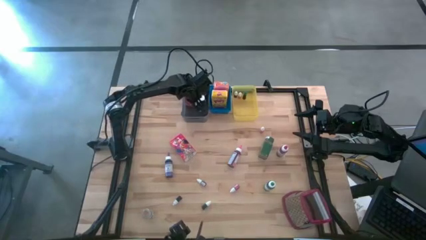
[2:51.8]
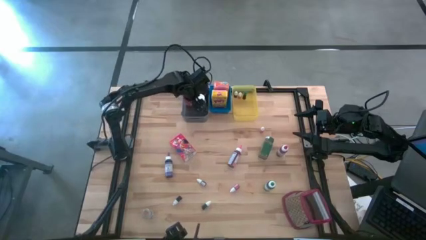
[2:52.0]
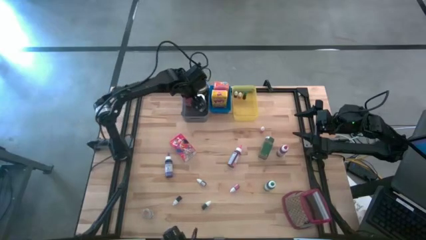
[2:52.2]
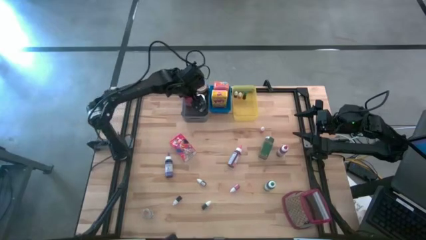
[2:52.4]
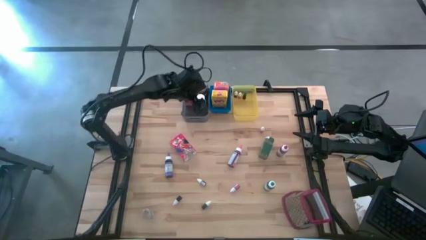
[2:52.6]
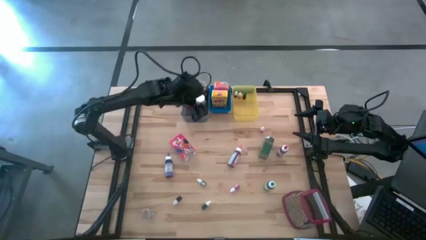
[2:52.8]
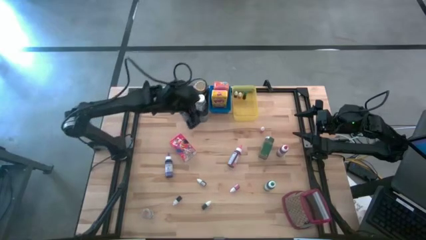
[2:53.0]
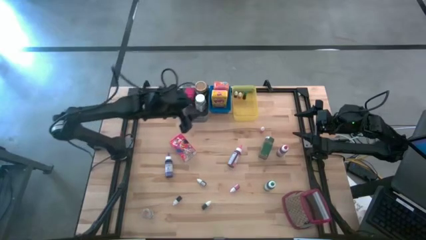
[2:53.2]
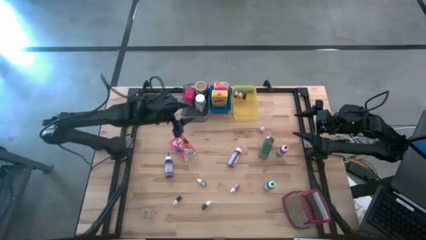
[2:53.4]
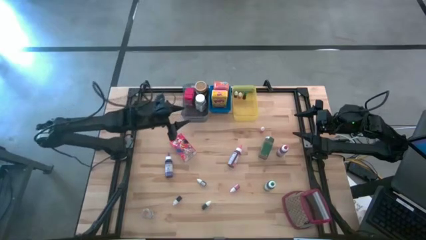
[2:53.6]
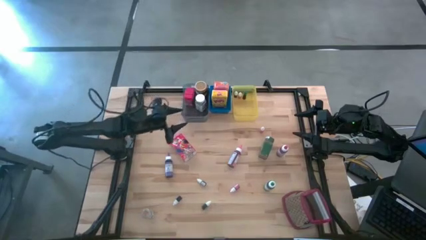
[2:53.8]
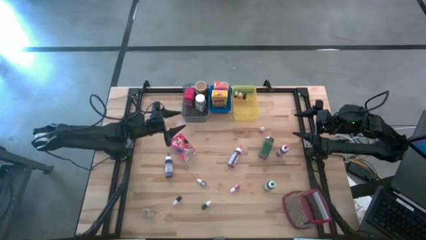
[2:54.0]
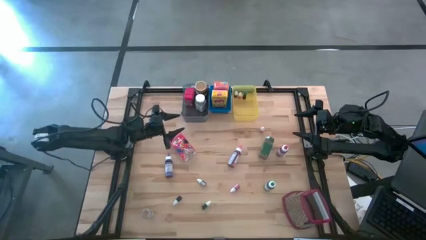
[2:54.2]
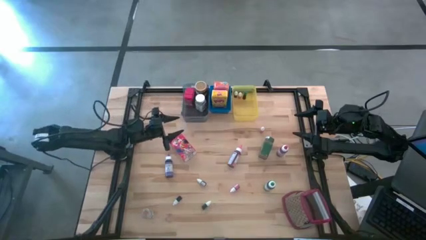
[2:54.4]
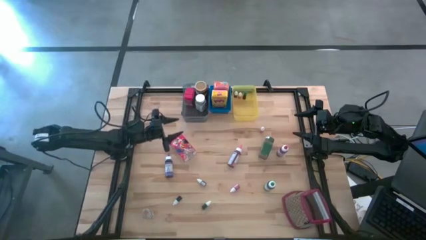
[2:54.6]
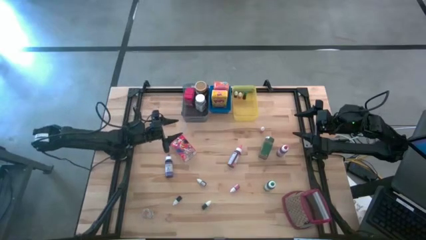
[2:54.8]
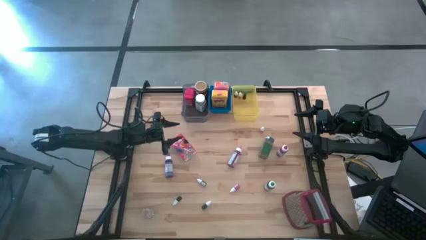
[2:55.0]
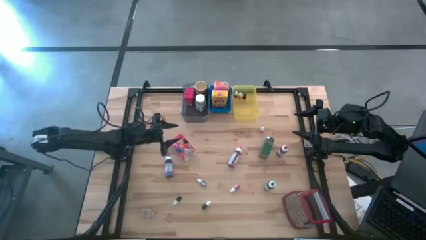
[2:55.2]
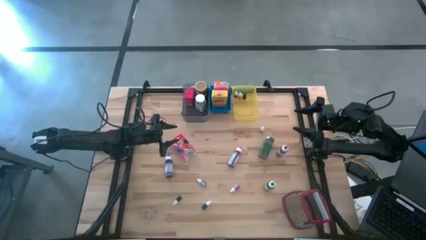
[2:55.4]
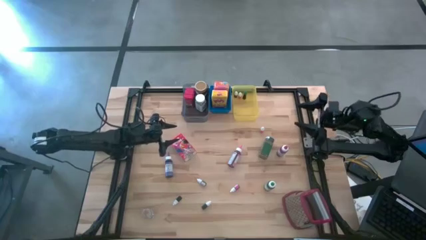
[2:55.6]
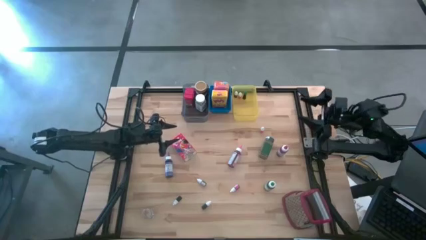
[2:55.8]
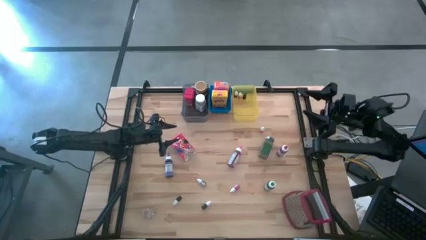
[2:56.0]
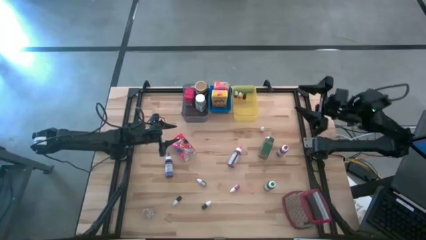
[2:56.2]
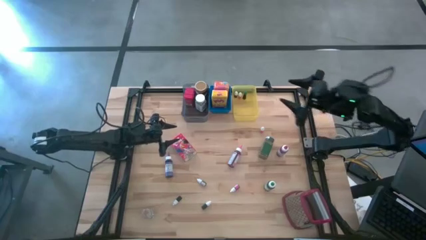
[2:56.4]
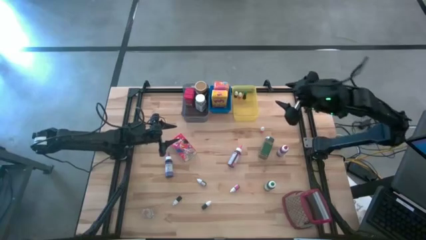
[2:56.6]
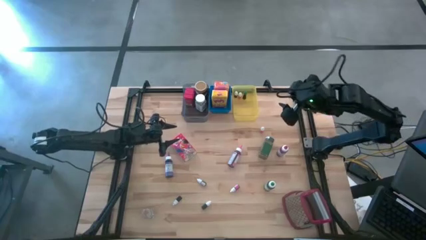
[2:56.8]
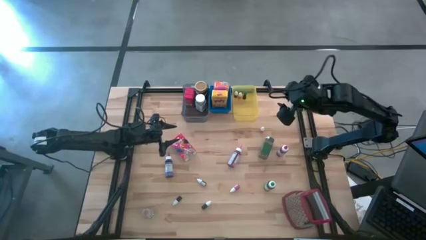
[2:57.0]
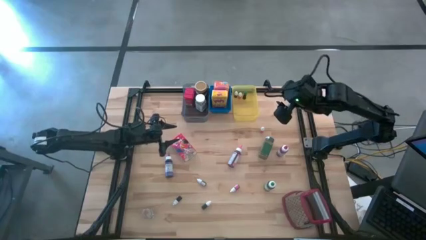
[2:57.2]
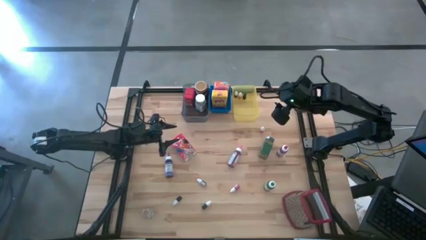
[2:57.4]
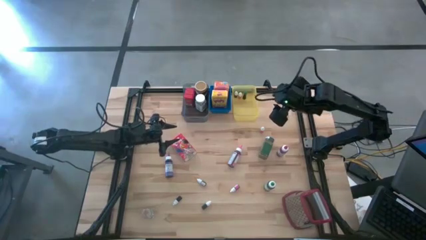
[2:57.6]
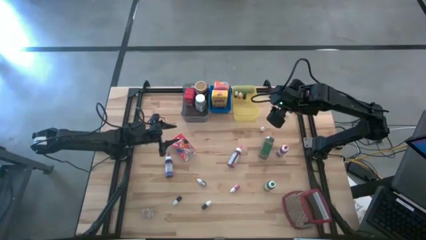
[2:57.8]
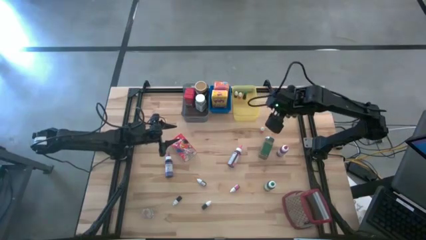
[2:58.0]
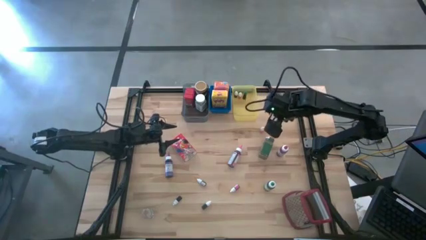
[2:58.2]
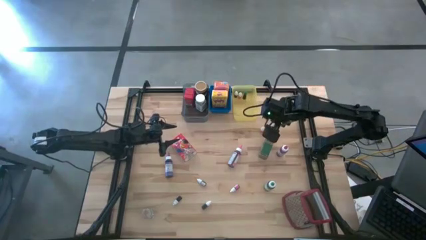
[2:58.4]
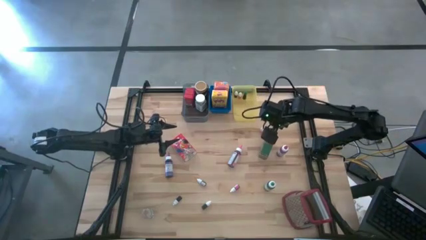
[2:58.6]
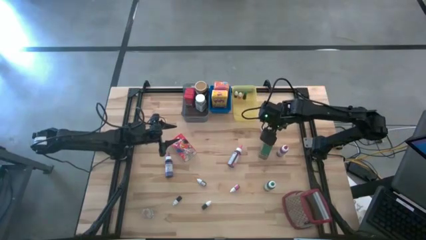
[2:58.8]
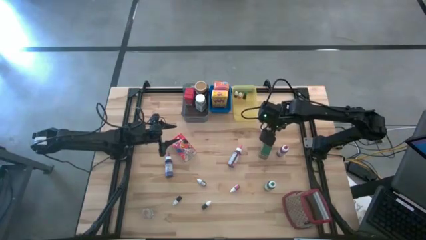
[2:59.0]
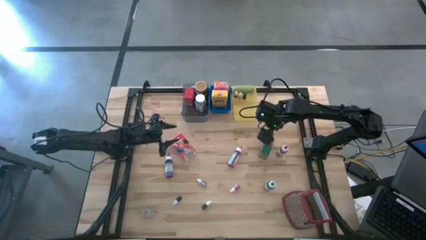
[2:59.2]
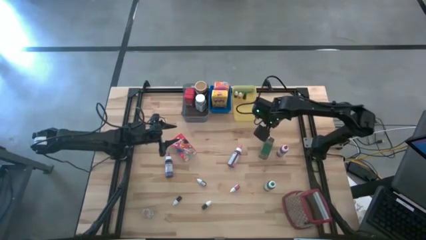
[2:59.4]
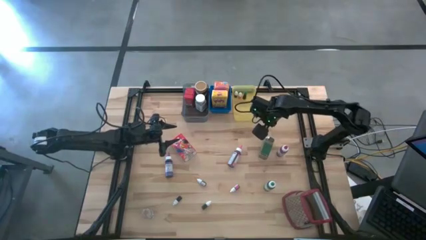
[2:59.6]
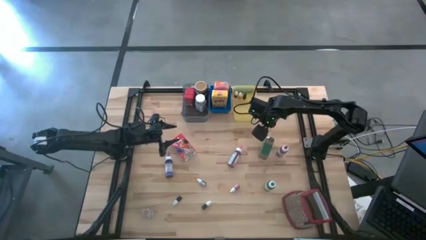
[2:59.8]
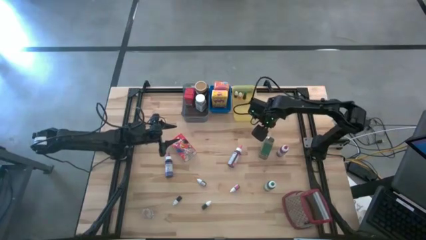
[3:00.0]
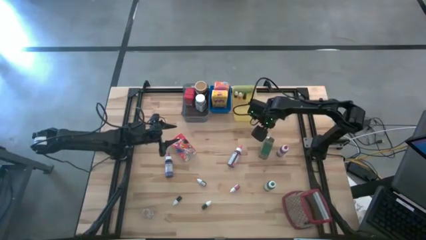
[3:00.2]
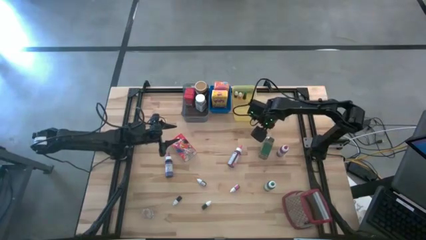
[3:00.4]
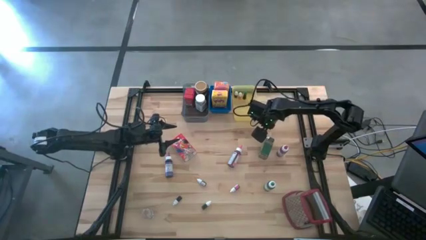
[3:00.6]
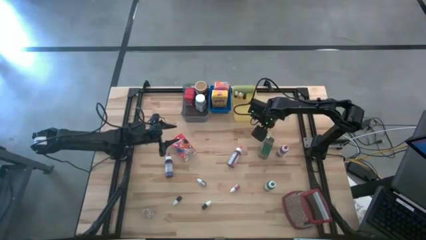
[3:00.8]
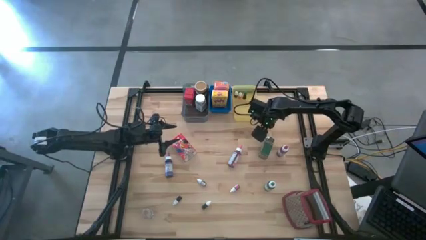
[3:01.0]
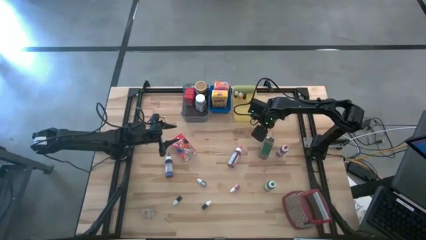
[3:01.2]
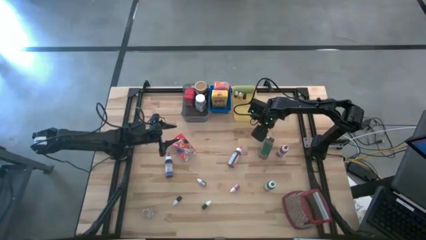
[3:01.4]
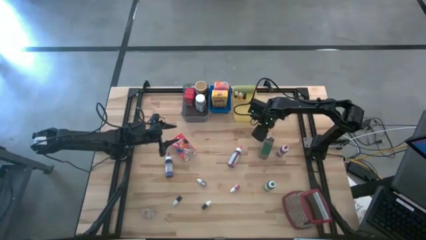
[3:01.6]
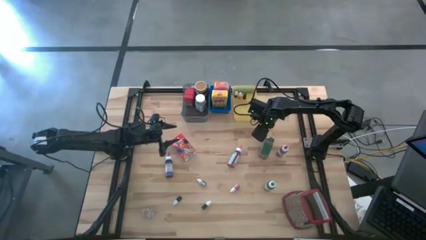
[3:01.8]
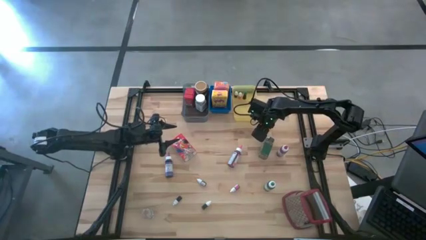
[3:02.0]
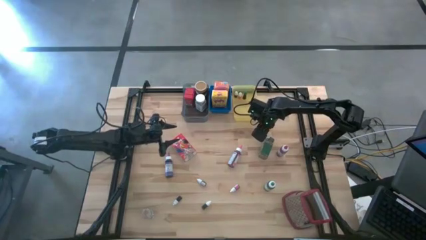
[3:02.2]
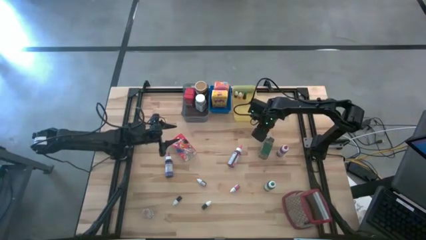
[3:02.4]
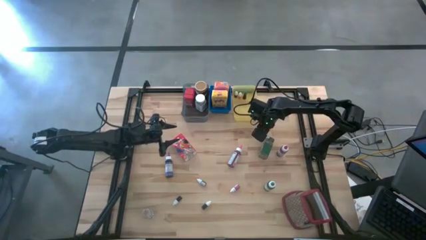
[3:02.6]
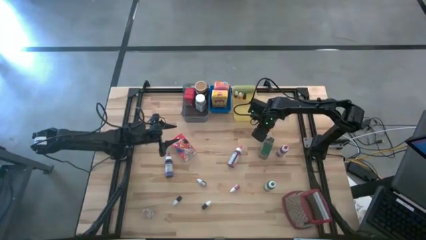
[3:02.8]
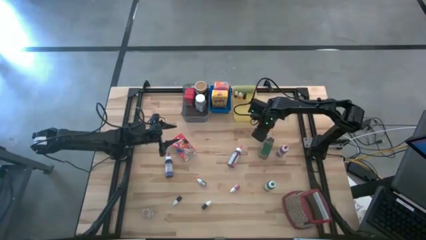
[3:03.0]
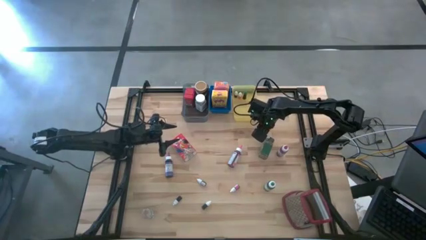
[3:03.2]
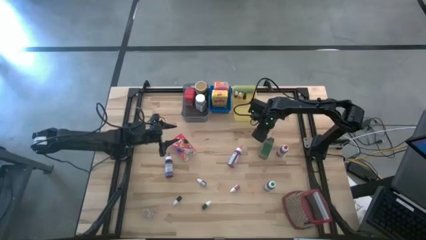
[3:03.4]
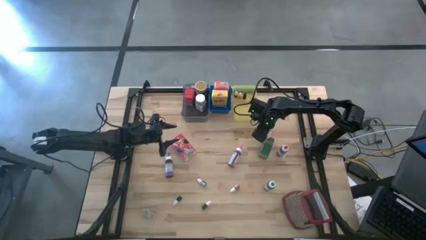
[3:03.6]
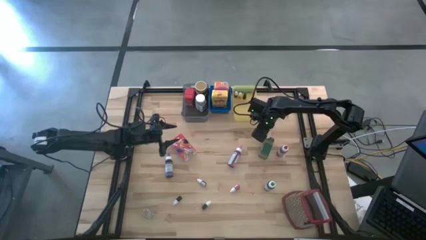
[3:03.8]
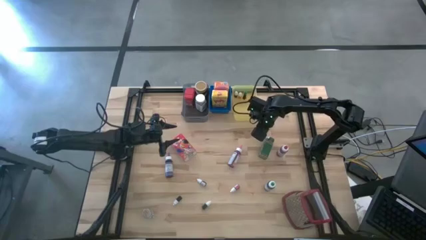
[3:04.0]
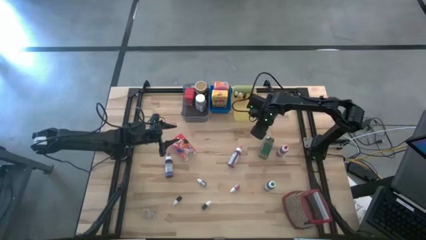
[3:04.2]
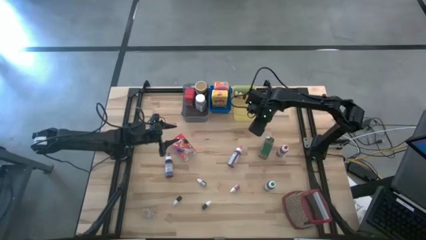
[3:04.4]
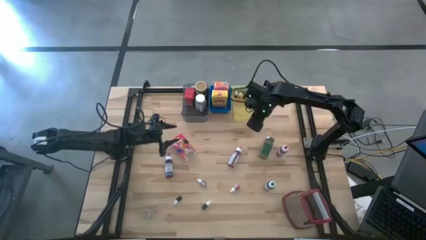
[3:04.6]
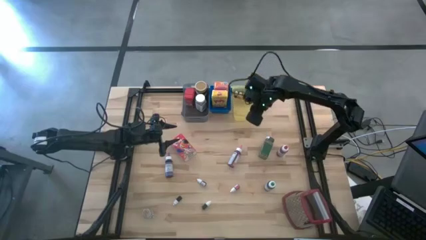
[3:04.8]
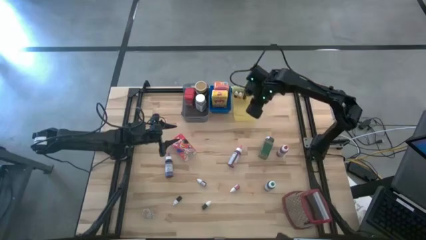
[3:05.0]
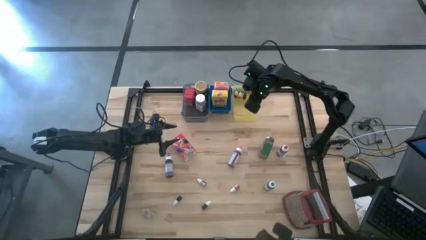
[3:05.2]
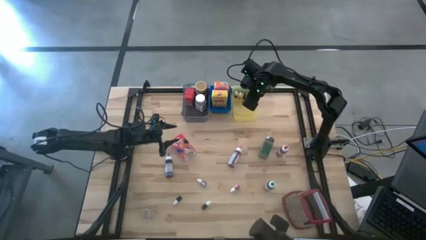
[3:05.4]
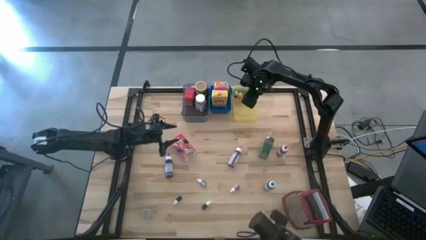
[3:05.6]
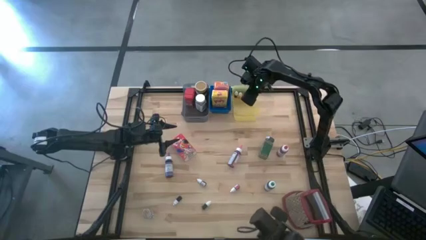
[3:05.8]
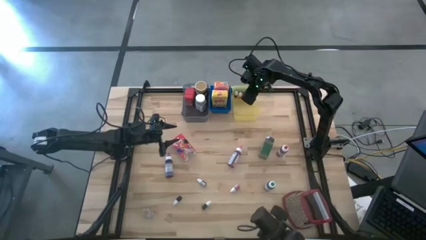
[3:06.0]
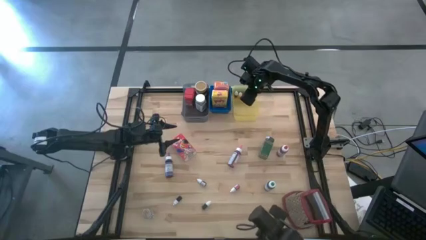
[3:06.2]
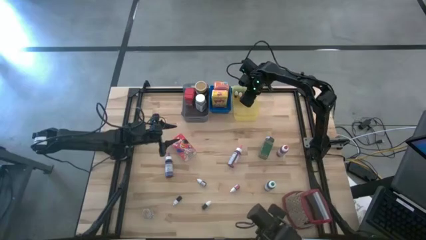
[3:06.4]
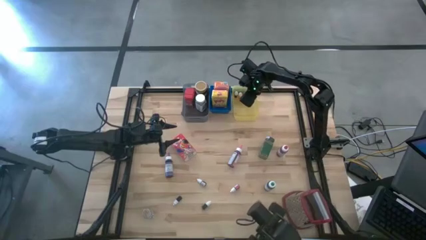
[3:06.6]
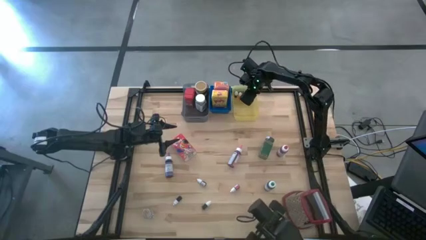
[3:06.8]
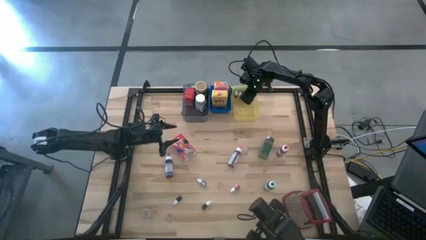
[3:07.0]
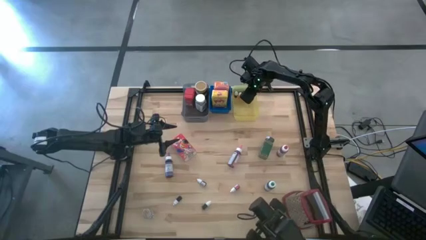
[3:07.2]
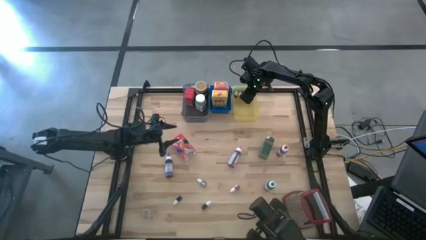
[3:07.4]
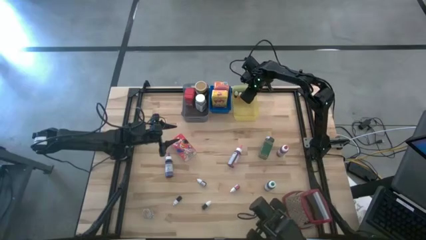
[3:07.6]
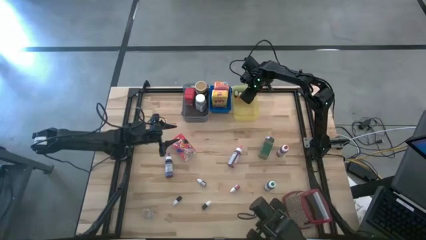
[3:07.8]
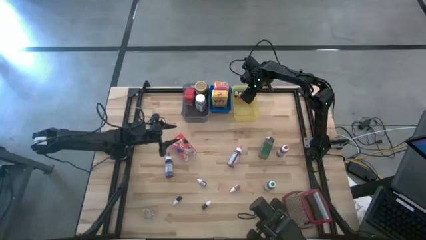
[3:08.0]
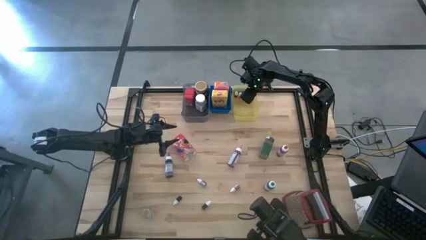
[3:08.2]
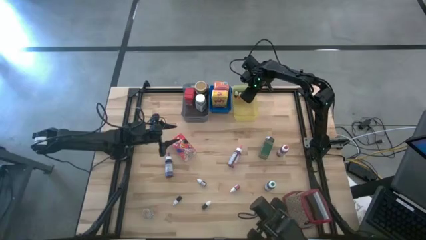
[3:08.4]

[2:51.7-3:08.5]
Task: Pick & Place Kitchen Items
Put the orange food coloring bottle into the yellow bin
